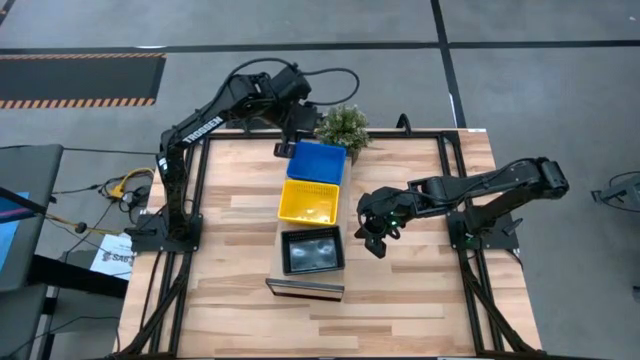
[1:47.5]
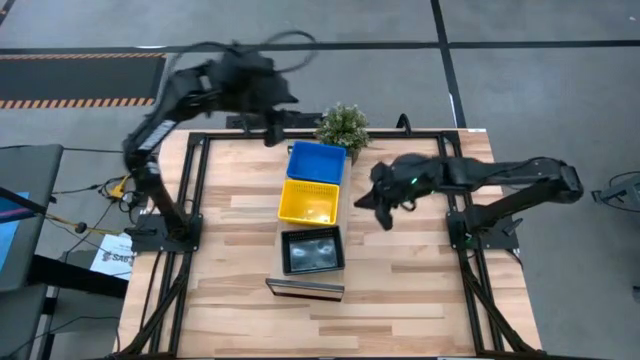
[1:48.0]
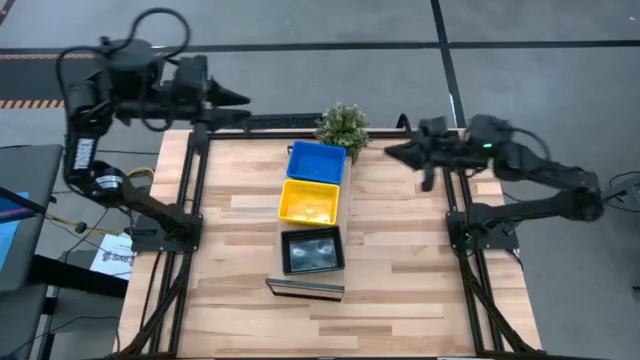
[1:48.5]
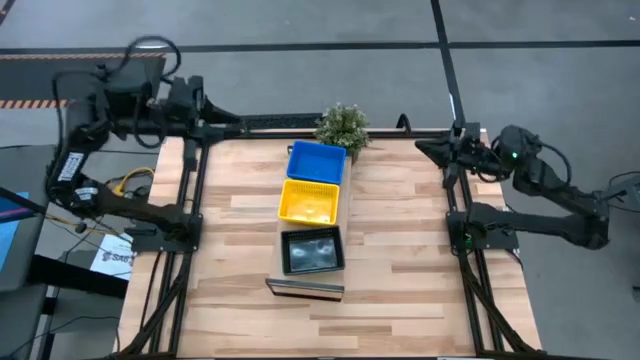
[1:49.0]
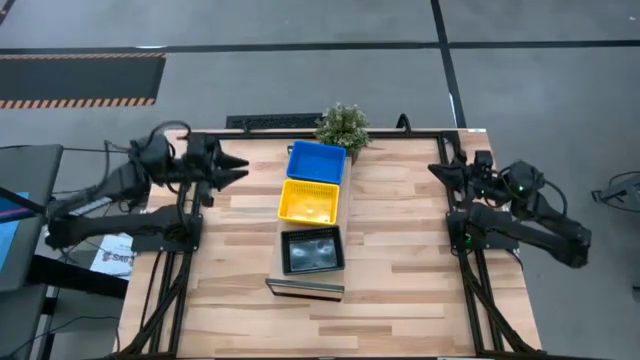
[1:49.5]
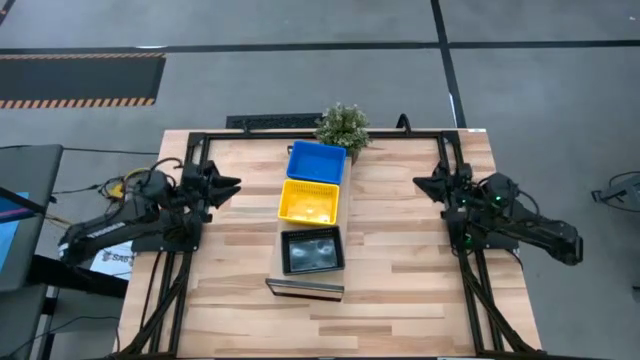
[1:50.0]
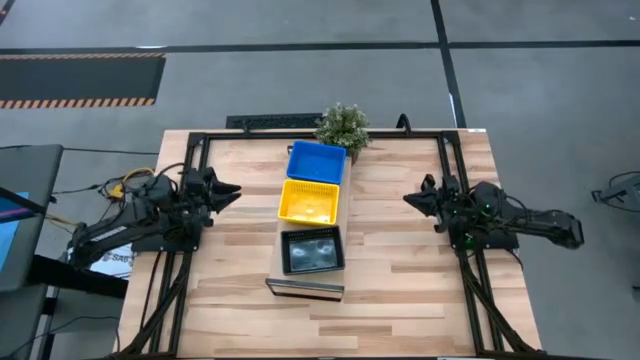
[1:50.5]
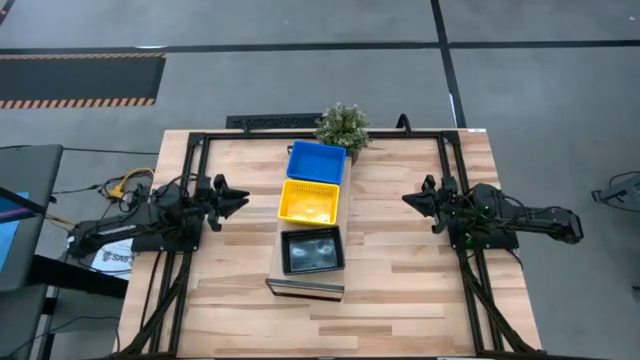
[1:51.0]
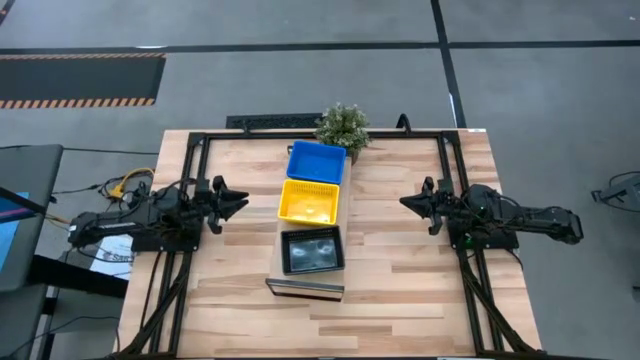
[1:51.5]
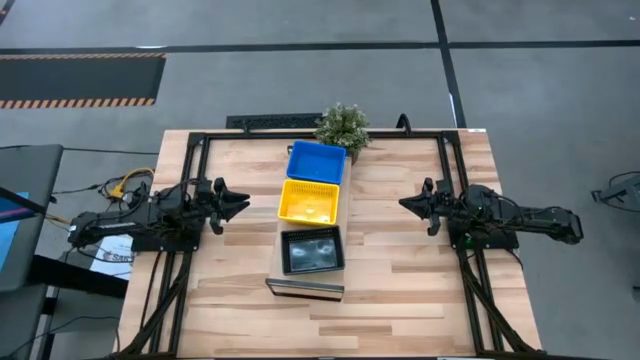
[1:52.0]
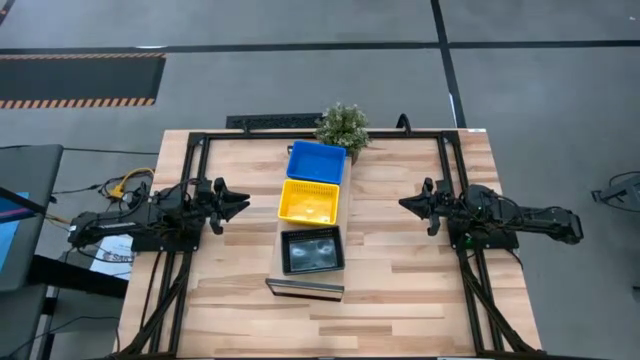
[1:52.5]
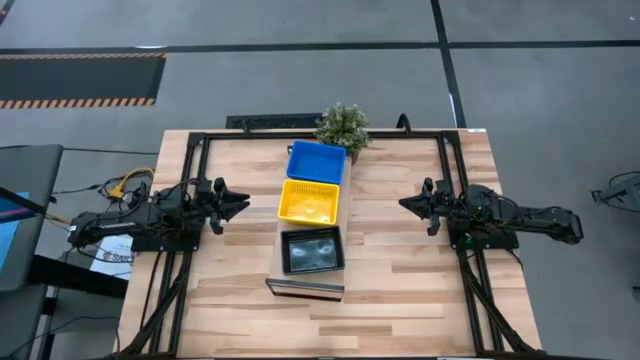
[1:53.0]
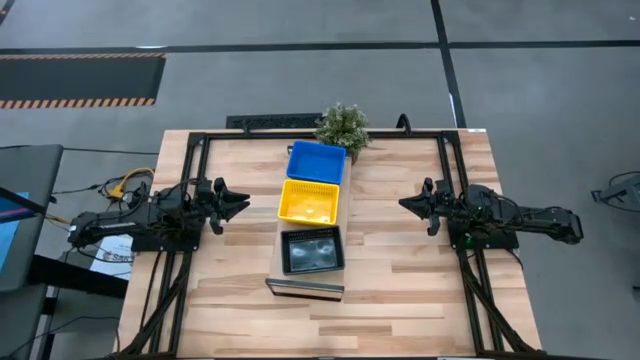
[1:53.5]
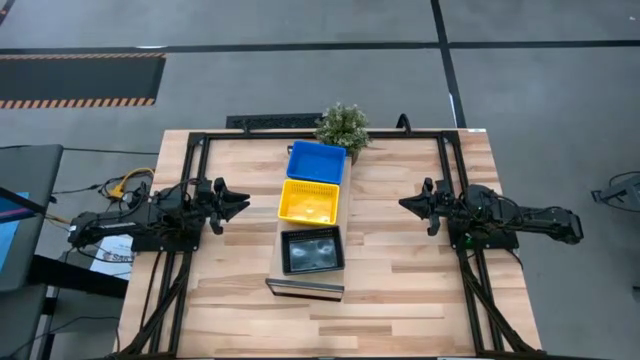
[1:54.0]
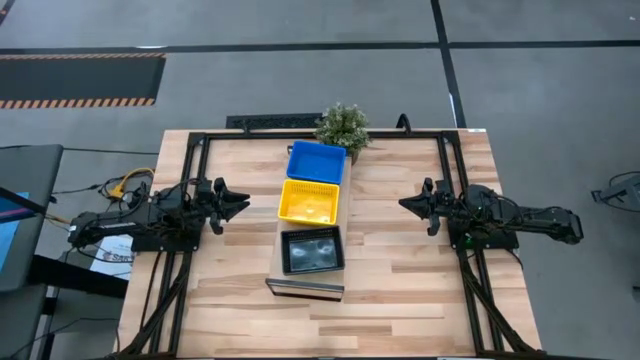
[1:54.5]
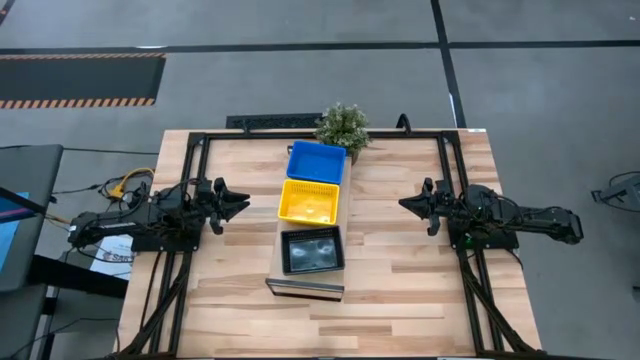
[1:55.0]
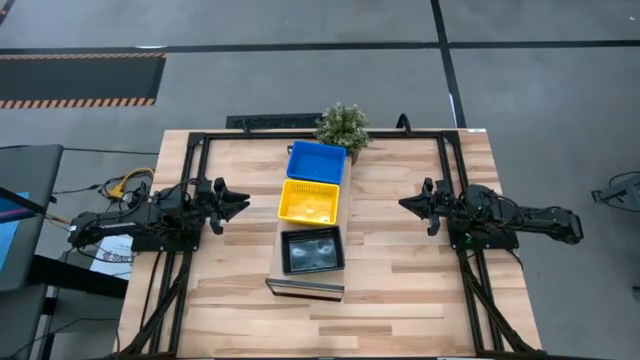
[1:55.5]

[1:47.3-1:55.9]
Task: Stack baskets on shelf by color
Return to Home Position

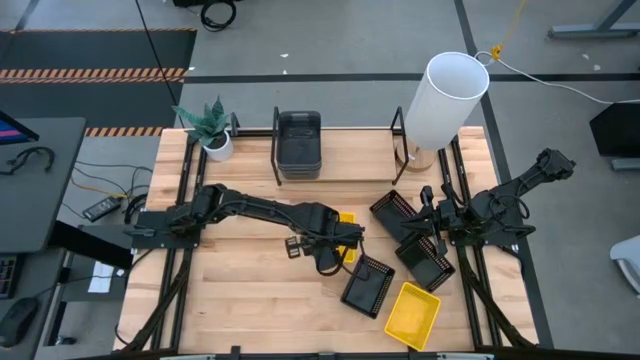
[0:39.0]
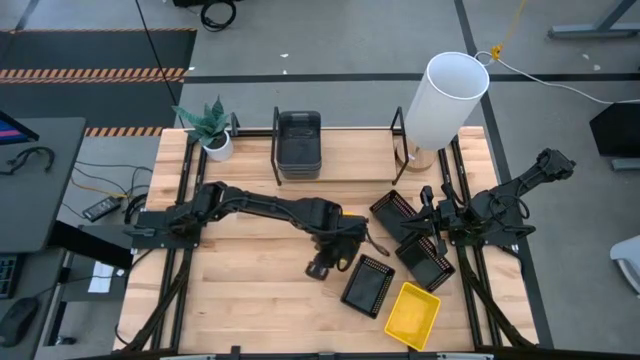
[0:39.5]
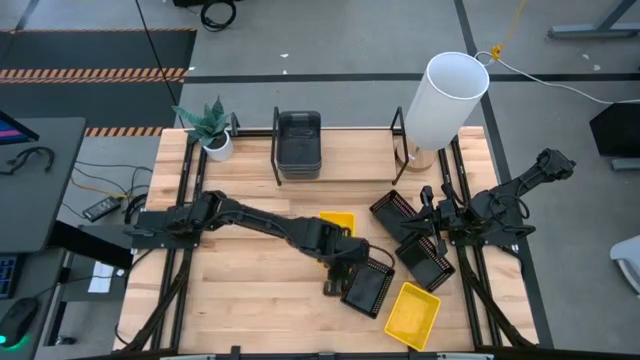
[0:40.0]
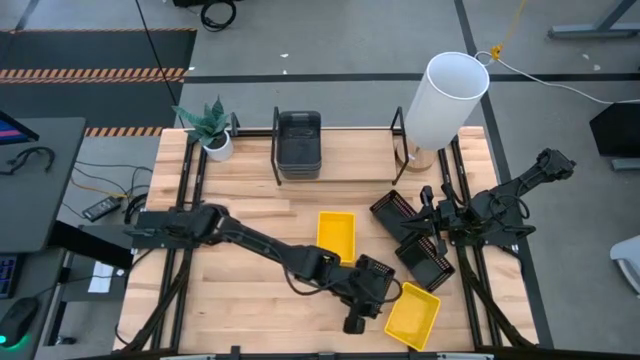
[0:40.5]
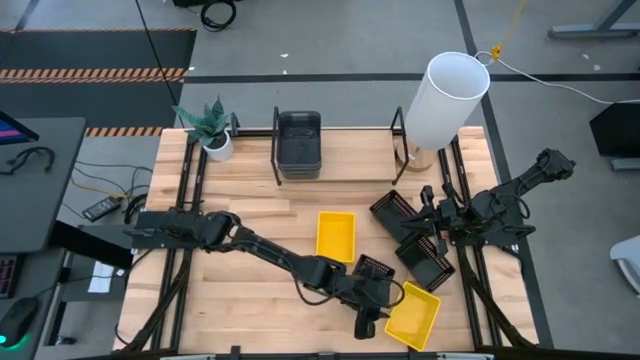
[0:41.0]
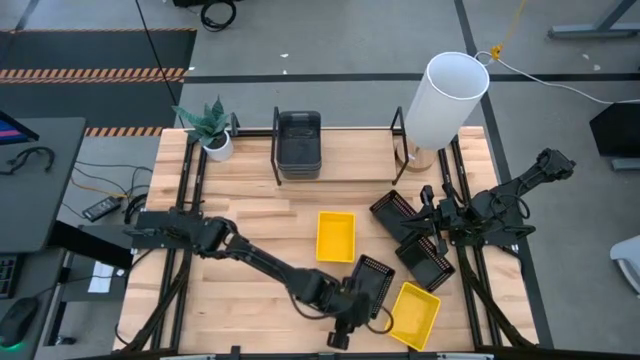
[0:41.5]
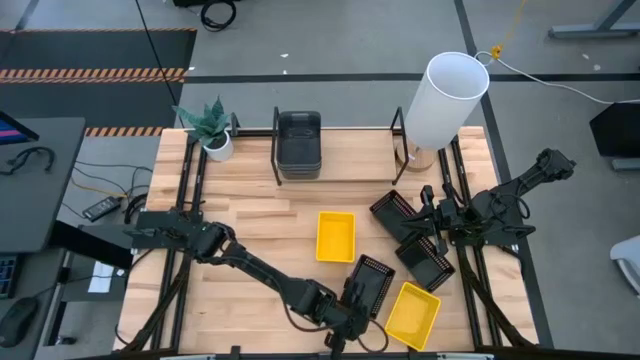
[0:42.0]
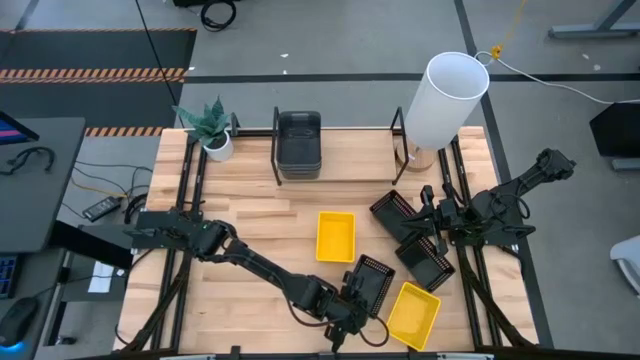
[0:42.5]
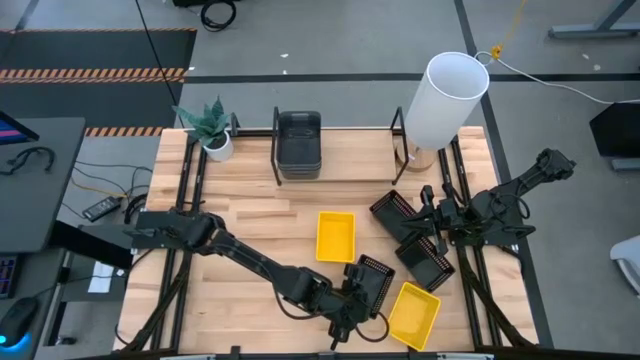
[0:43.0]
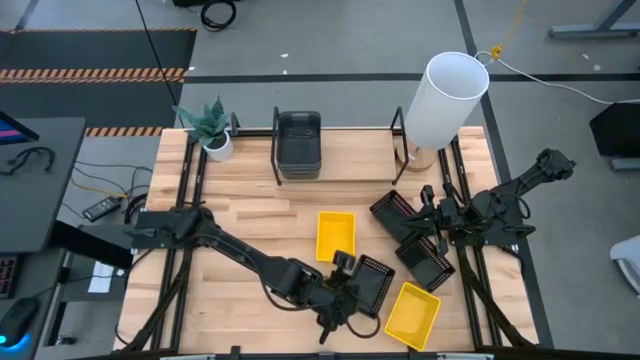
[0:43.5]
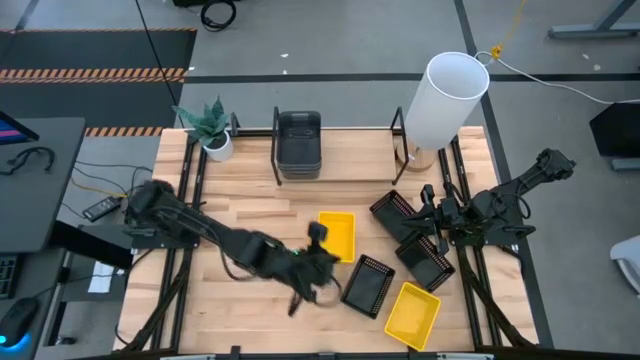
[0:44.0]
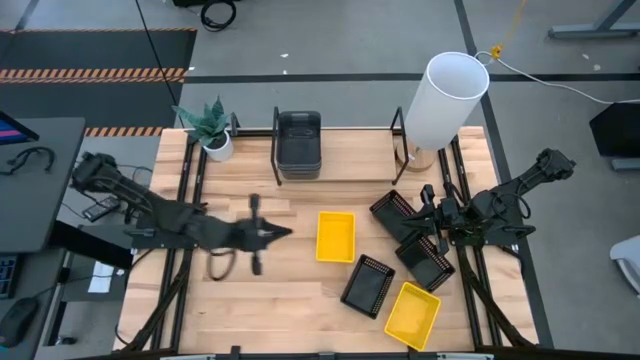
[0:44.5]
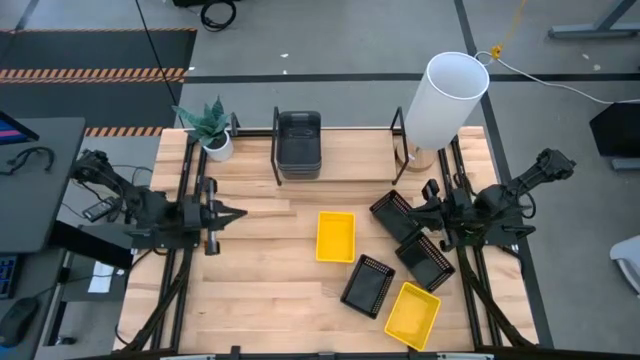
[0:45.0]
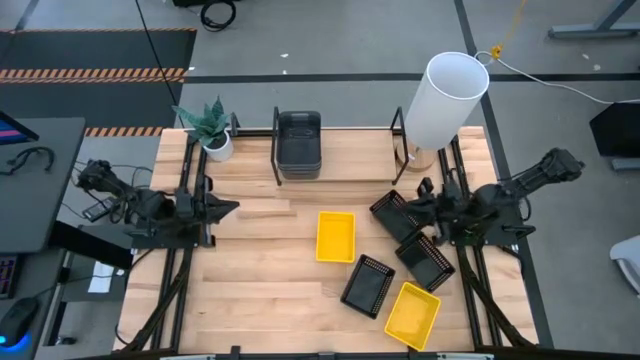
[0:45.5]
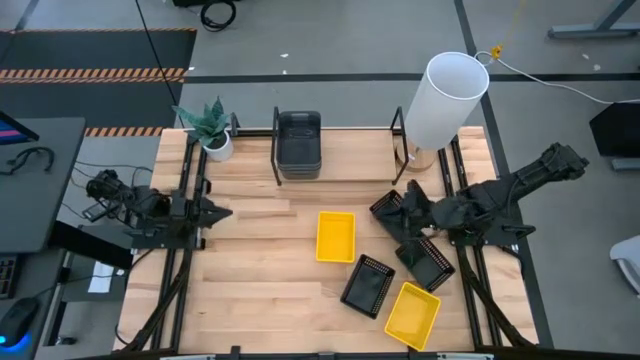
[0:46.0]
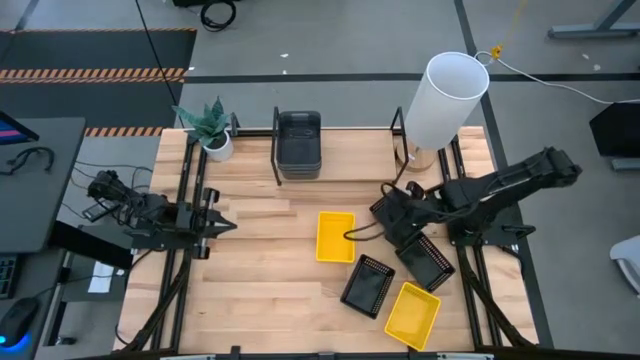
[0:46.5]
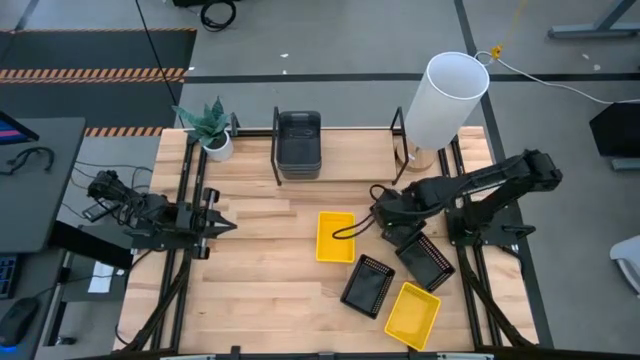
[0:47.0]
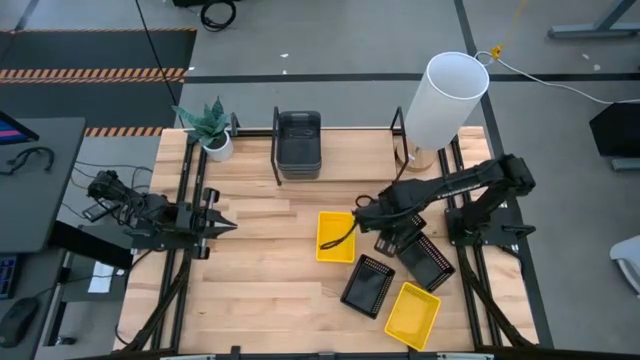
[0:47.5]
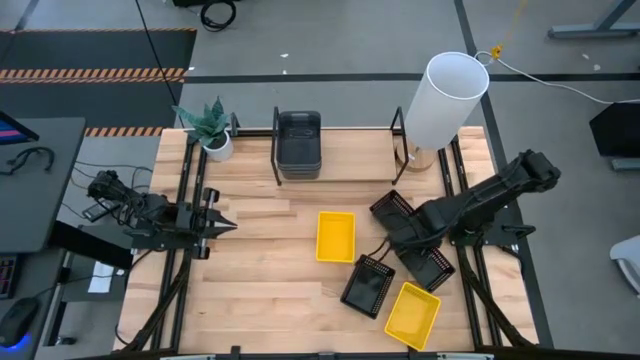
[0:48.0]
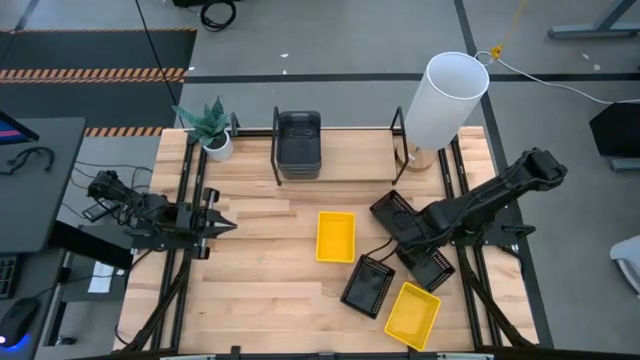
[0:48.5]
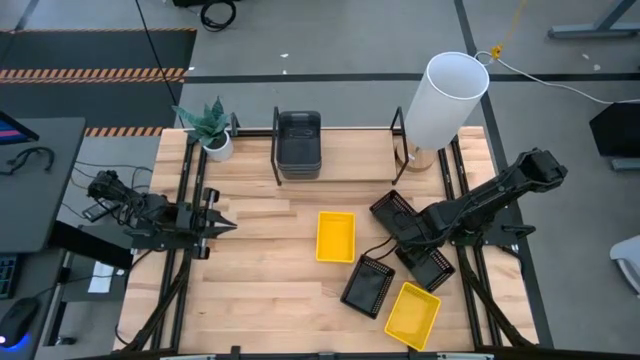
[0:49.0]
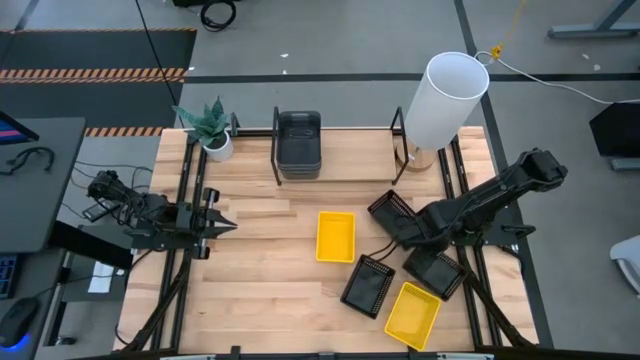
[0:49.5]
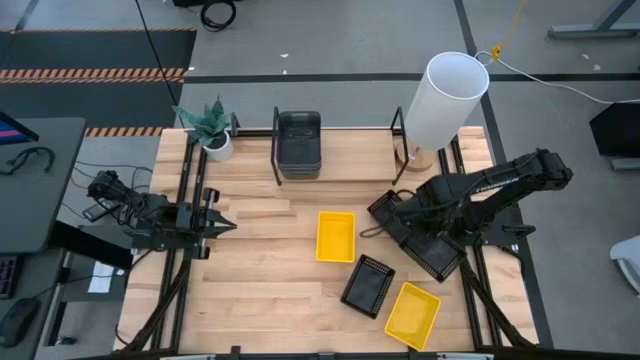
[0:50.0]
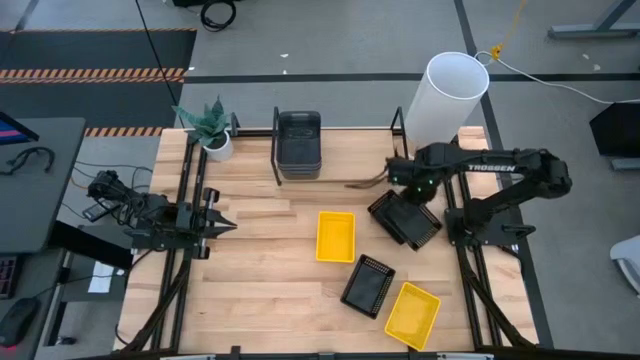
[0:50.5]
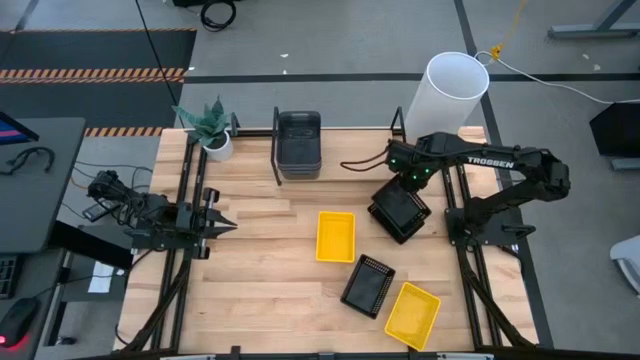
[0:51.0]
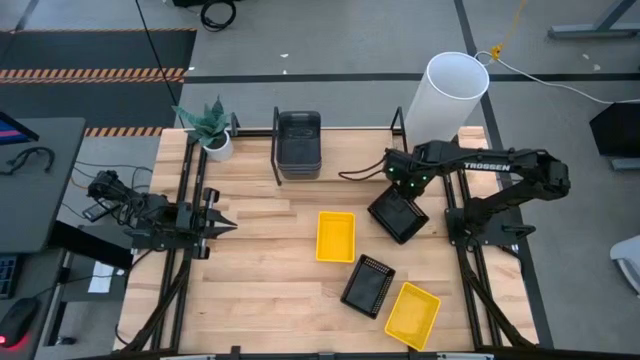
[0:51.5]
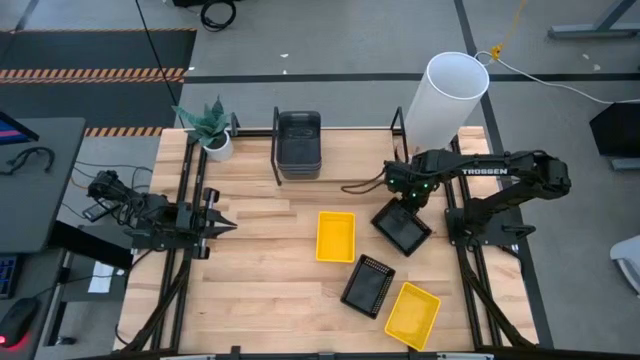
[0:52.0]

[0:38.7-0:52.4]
Task: Stack baskets on shelf by color
Stack the middle black basket on top of the top black basket
